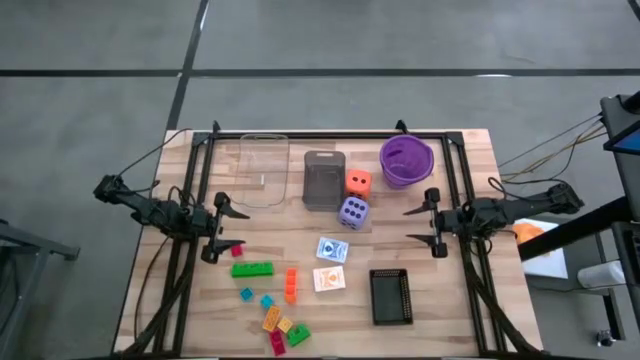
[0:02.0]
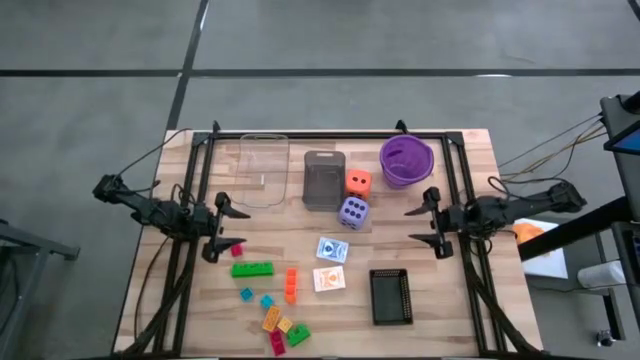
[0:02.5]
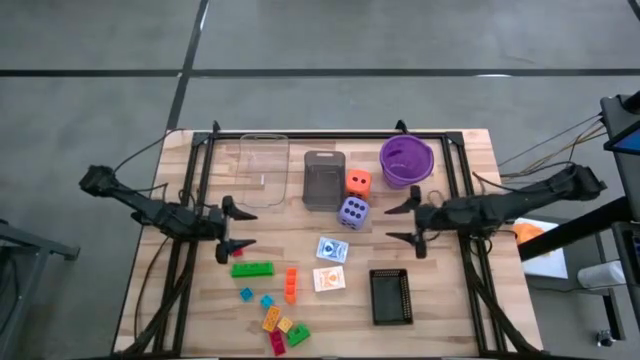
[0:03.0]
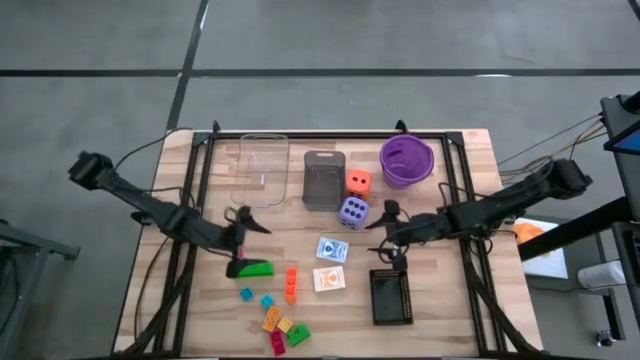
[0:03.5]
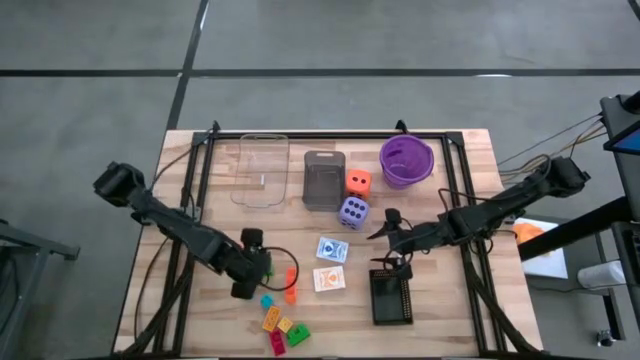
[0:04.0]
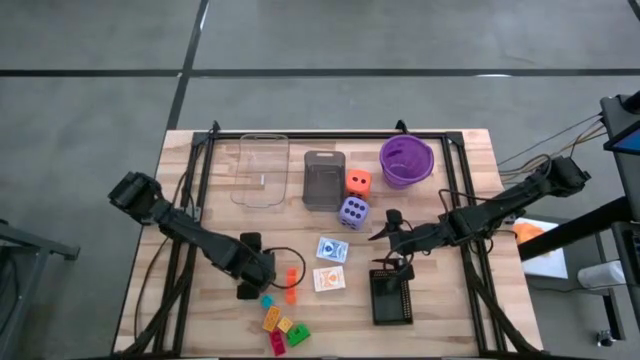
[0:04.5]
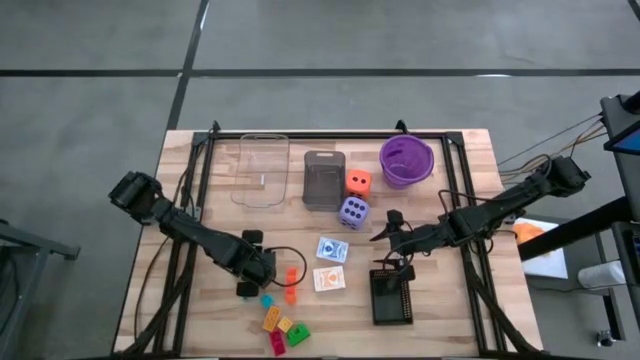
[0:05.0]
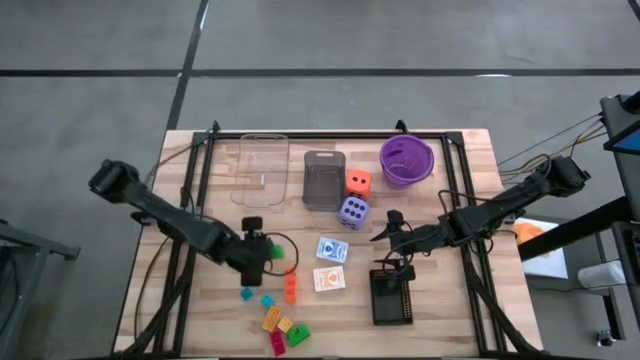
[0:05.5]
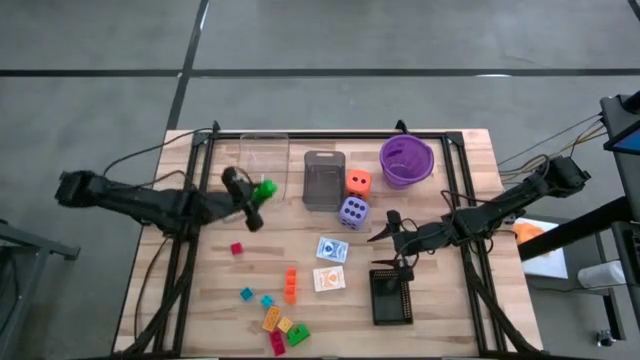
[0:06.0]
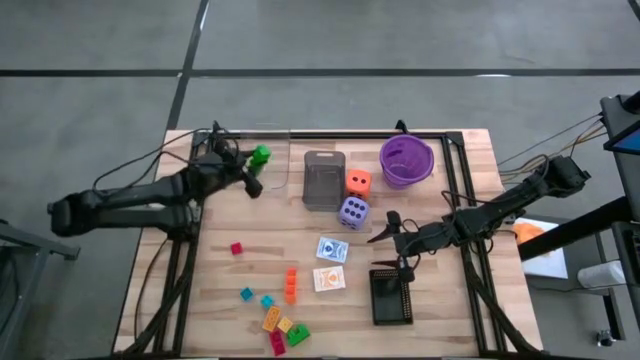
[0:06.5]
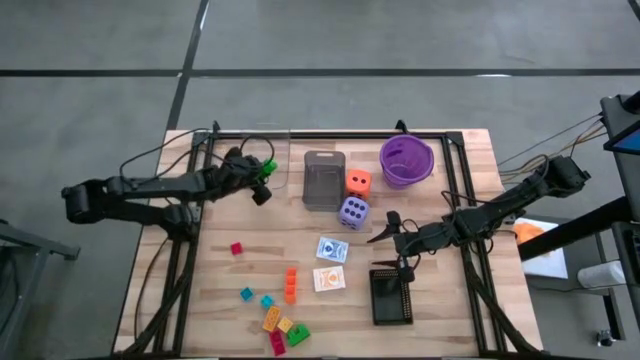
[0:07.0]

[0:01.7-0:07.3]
Task: Pick & Place Toys
Put the top green game piece into the transparent bin

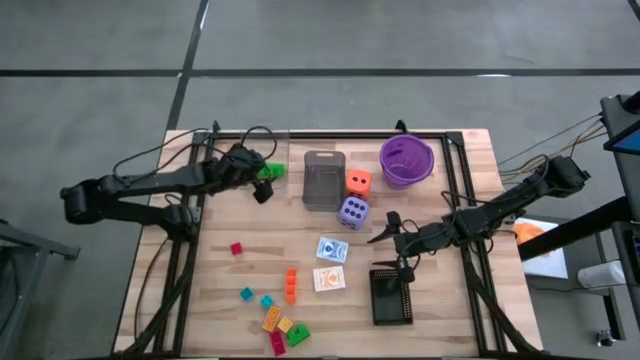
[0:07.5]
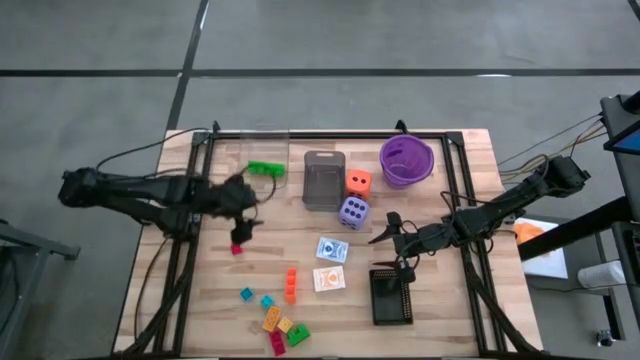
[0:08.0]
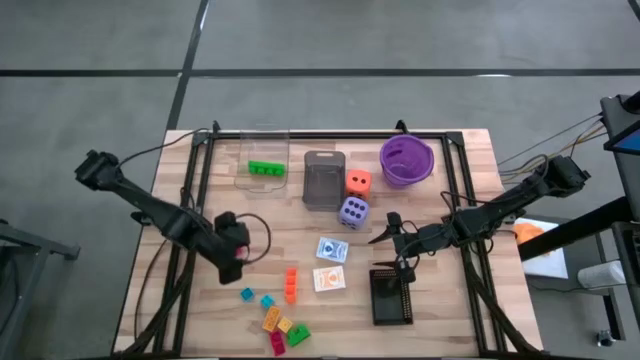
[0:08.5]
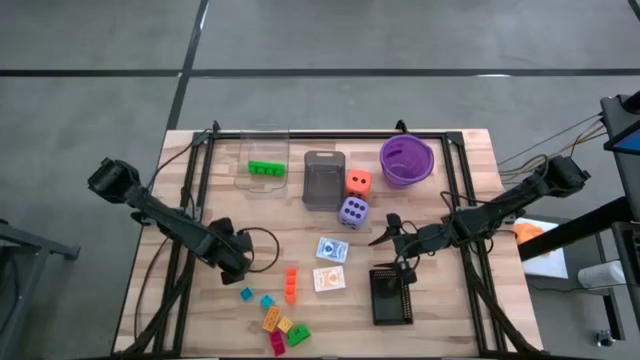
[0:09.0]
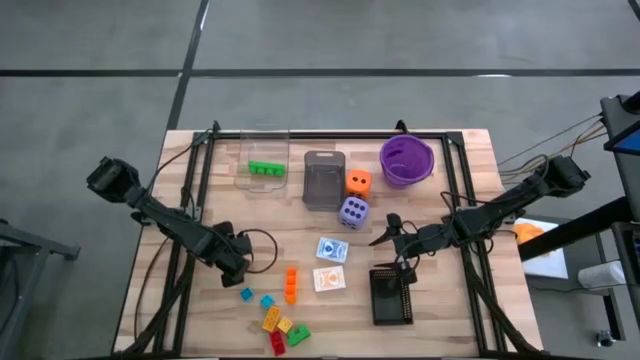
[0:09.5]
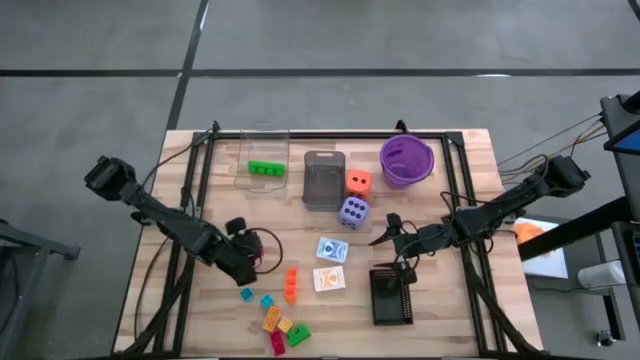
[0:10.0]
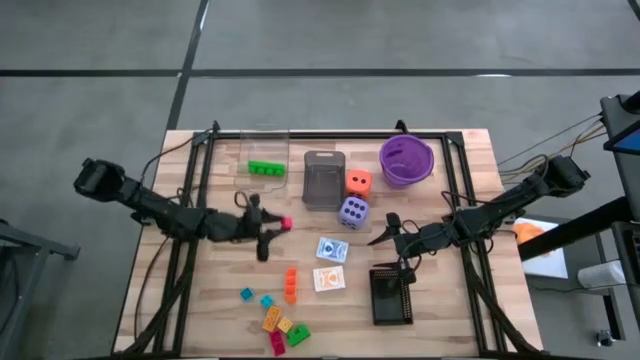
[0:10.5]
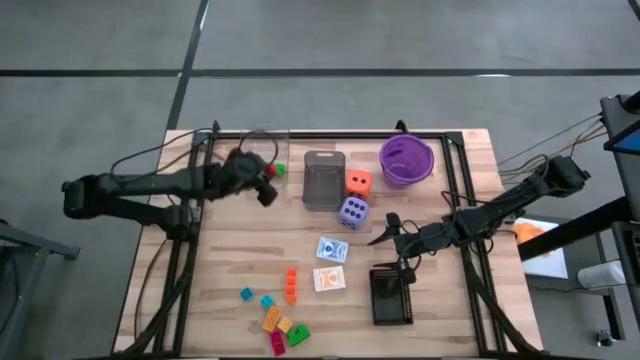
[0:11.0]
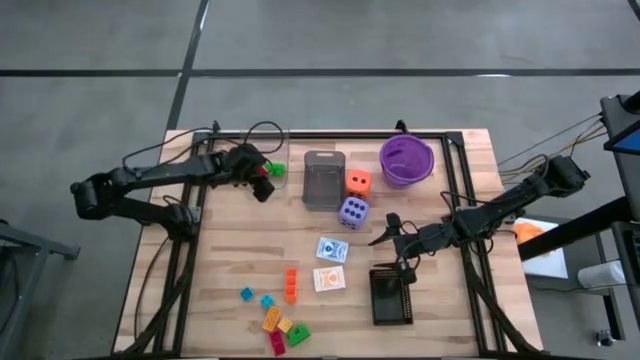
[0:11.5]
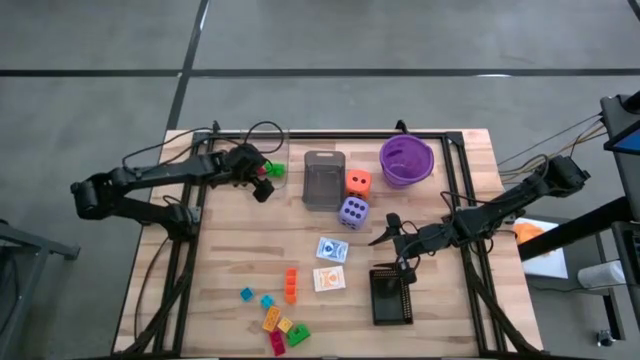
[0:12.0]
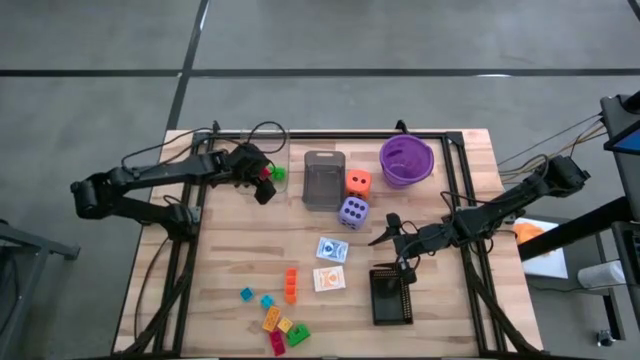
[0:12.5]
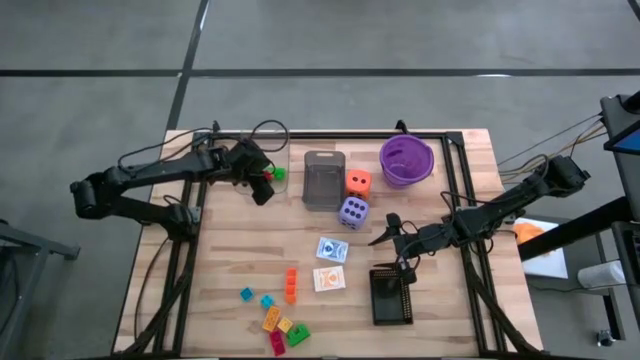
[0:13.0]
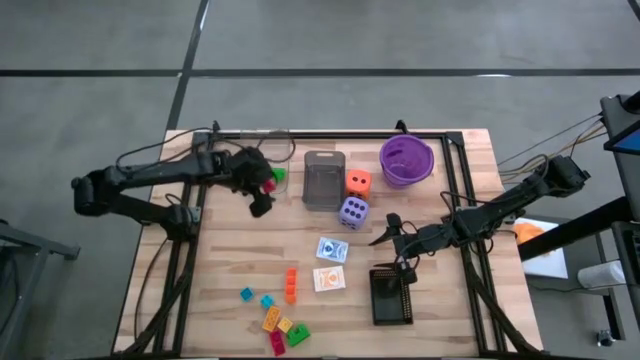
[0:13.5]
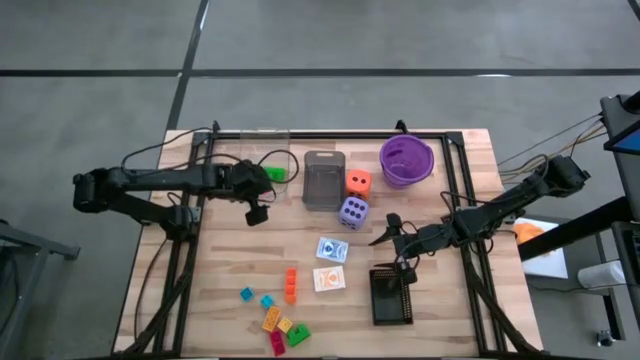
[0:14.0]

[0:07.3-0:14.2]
Put the top red game piece into the transparent bin

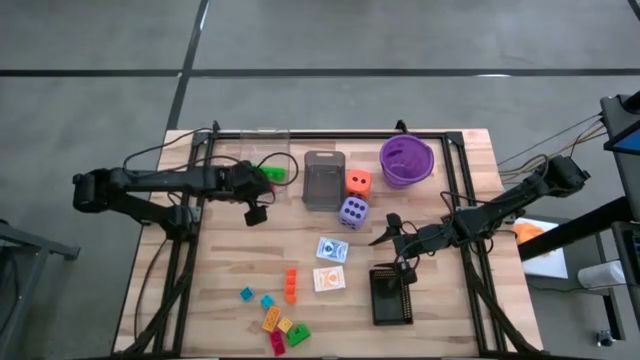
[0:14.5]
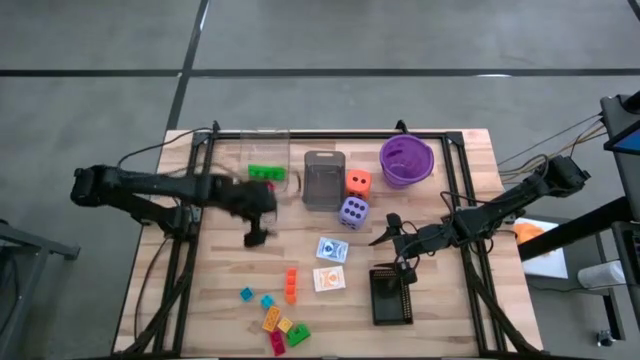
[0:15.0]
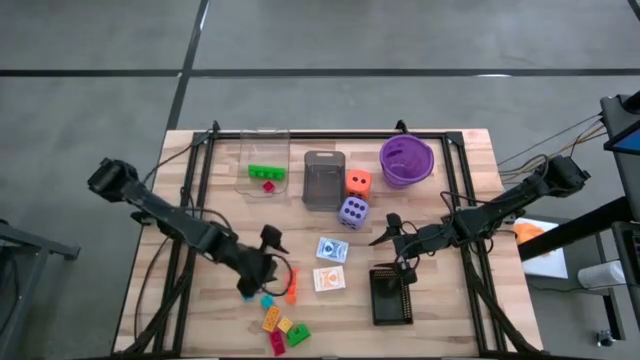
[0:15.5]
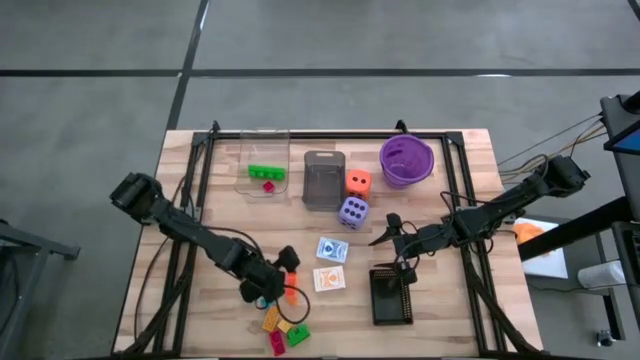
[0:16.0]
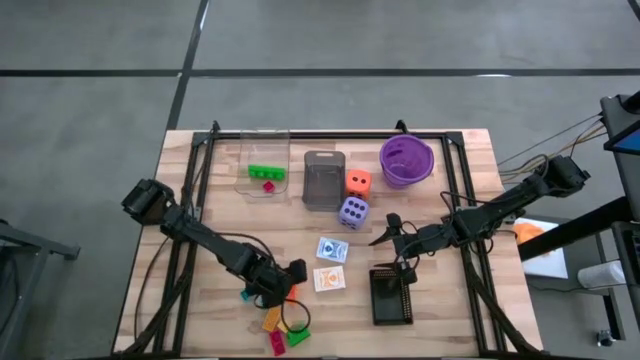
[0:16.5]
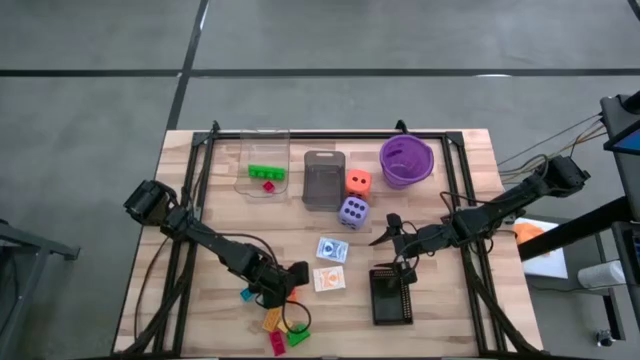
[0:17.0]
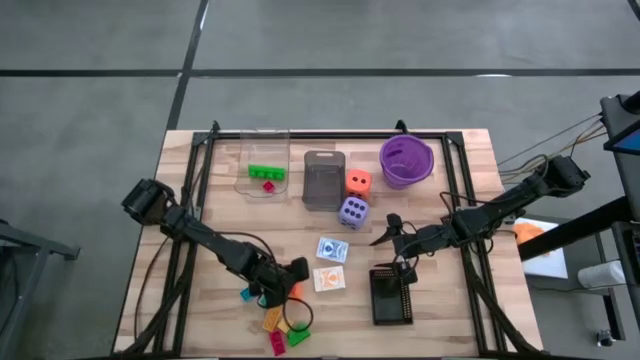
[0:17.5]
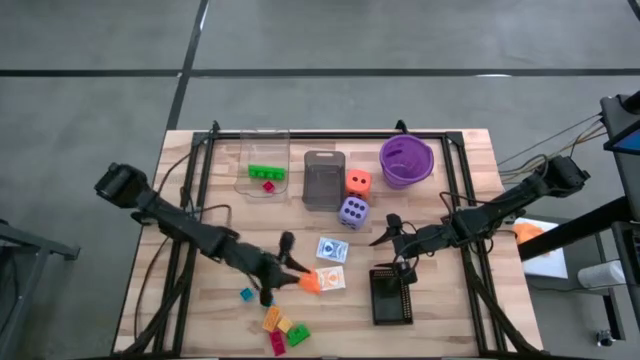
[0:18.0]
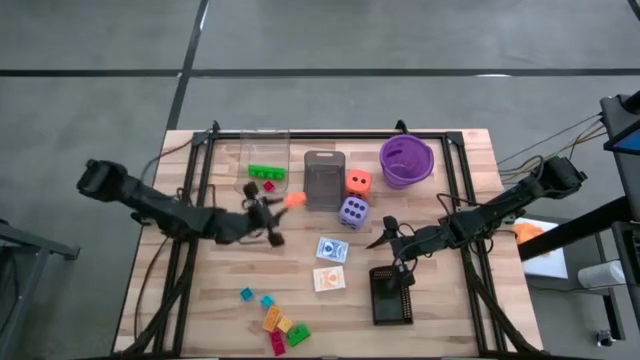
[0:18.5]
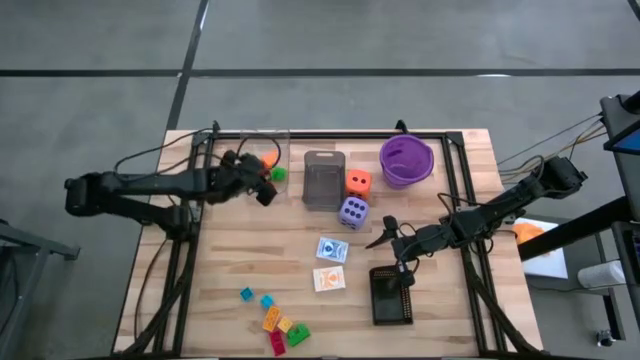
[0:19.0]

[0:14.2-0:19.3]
Put the orange game piece into the transparent bin

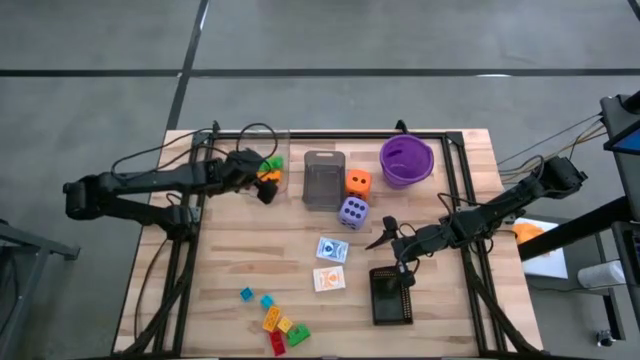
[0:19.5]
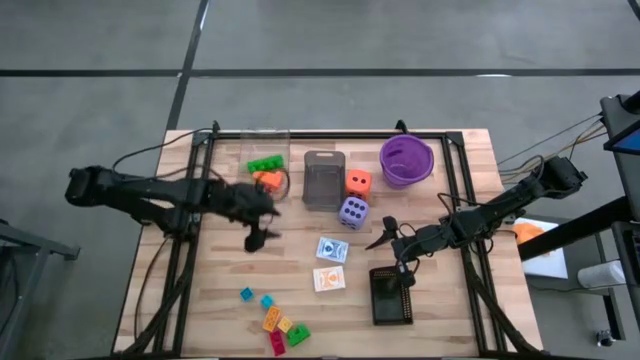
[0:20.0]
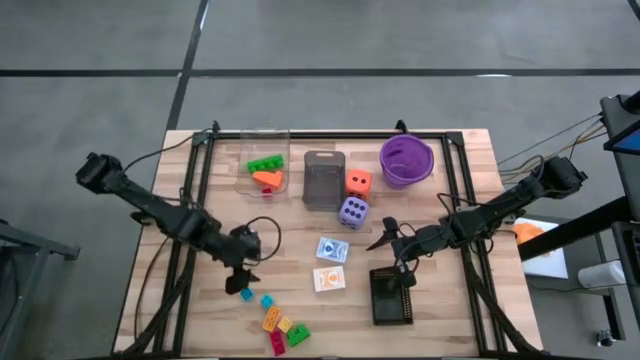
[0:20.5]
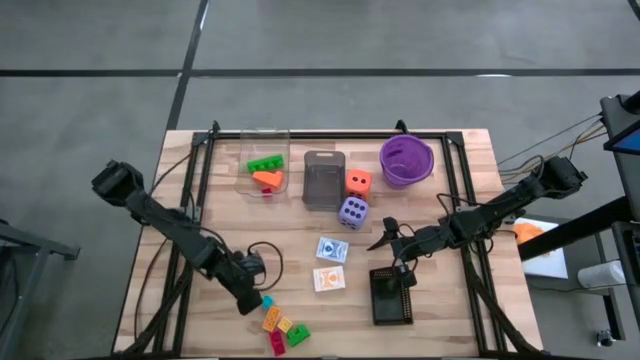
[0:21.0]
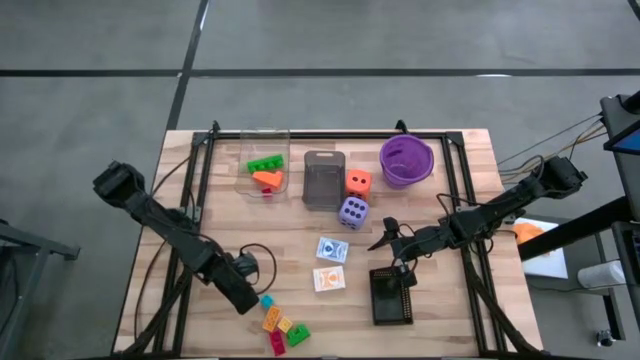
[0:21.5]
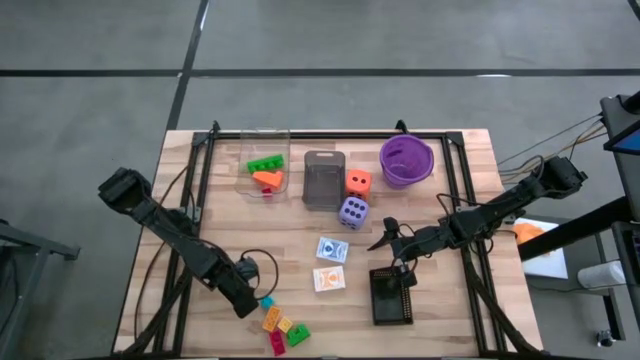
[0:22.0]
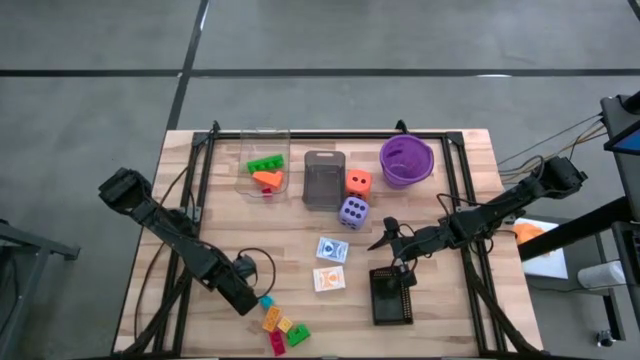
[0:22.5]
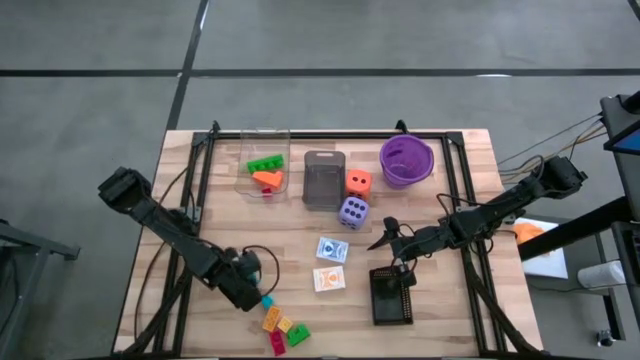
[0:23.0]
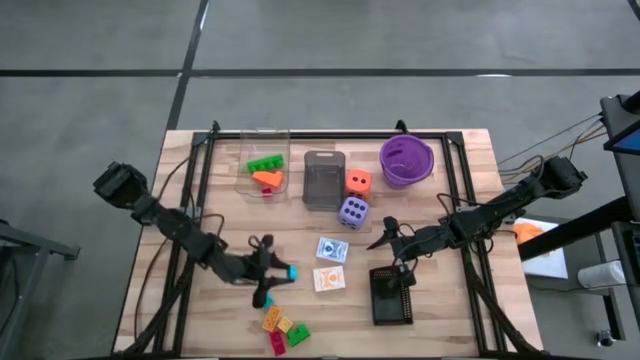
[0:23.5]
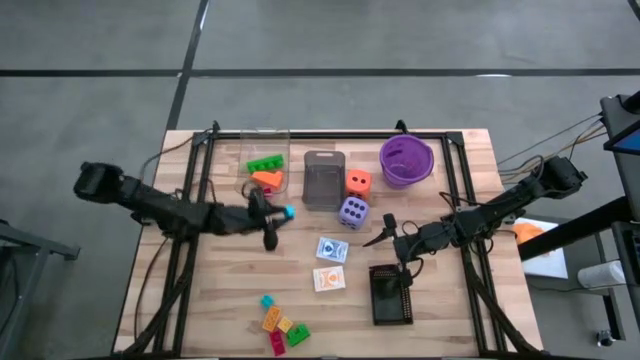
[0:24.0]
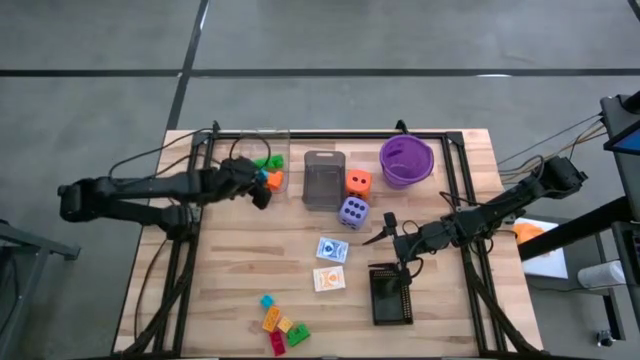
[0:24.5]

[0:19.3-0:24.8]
Put the left blue game piece into the transparent bin
